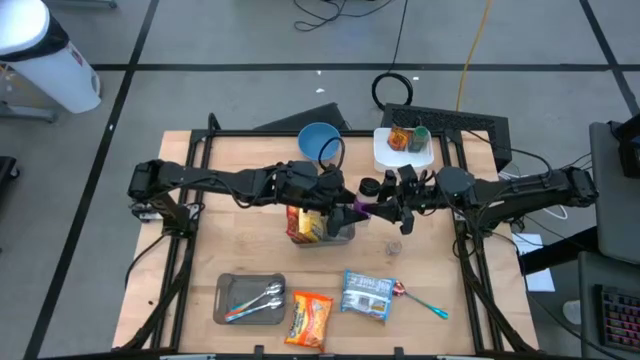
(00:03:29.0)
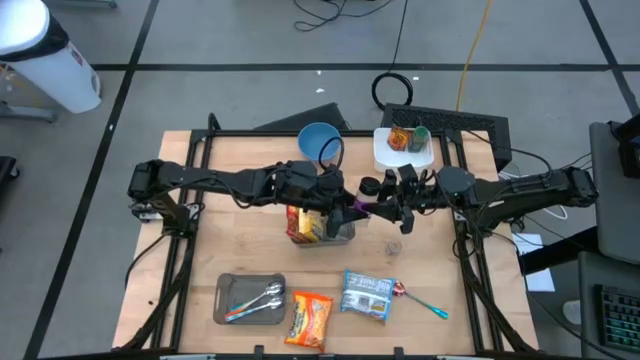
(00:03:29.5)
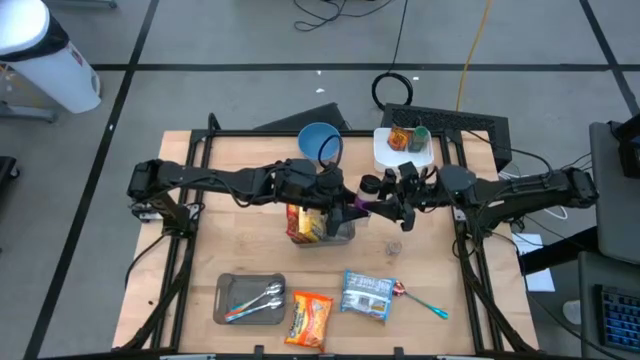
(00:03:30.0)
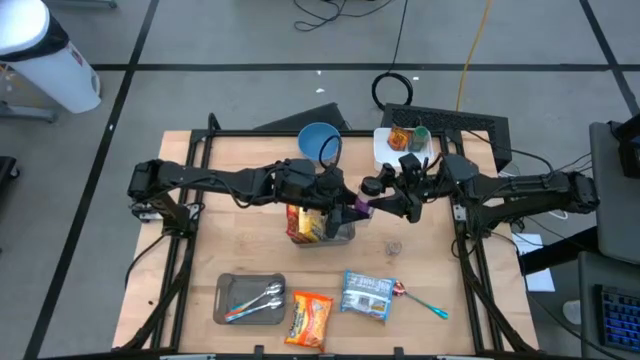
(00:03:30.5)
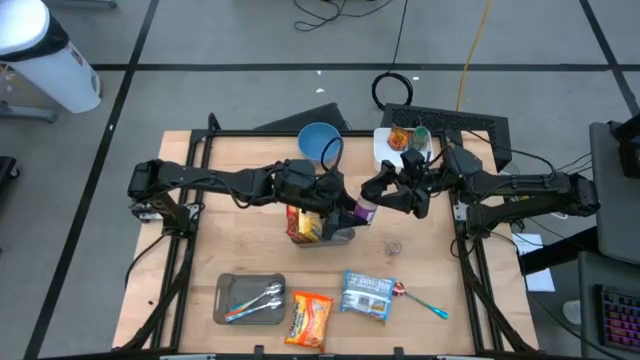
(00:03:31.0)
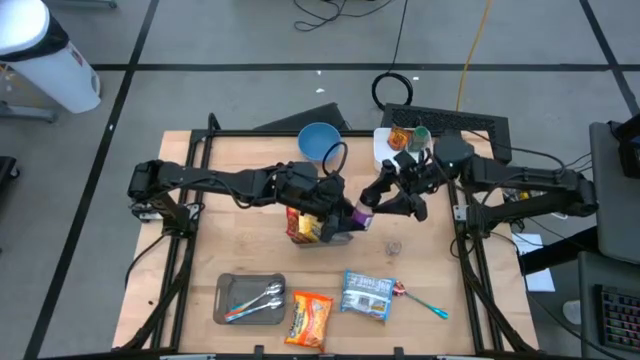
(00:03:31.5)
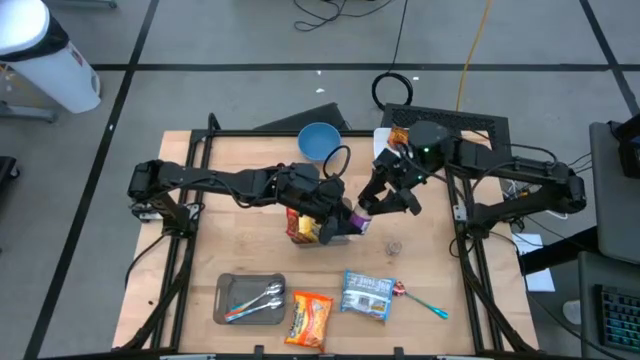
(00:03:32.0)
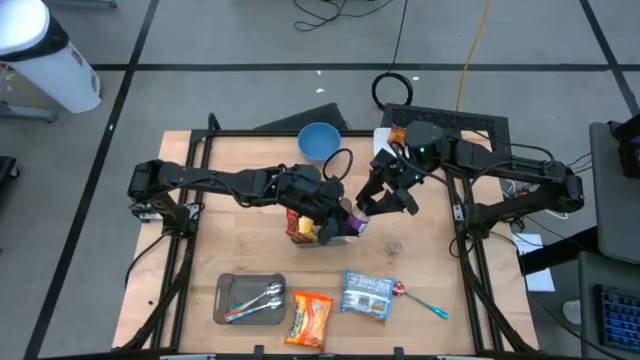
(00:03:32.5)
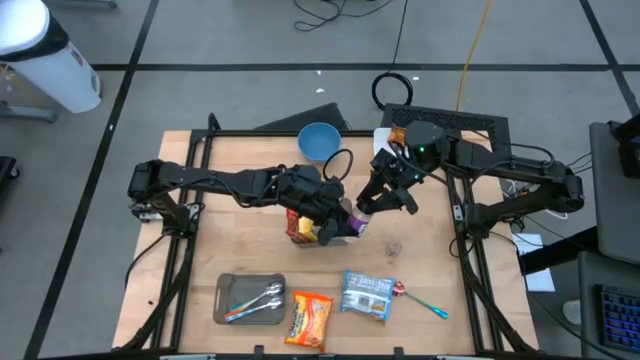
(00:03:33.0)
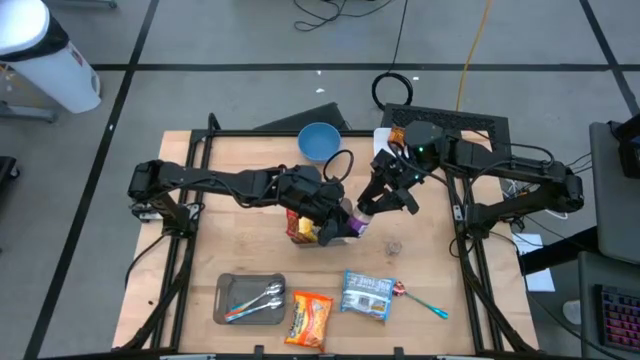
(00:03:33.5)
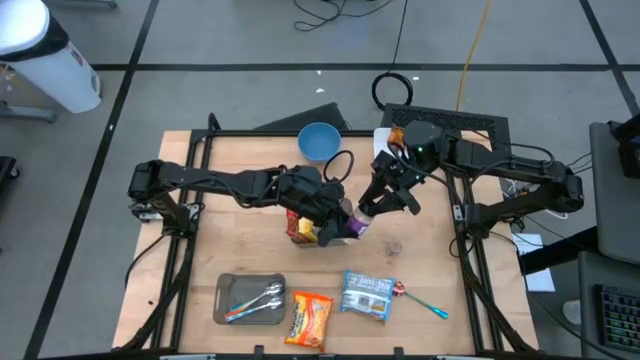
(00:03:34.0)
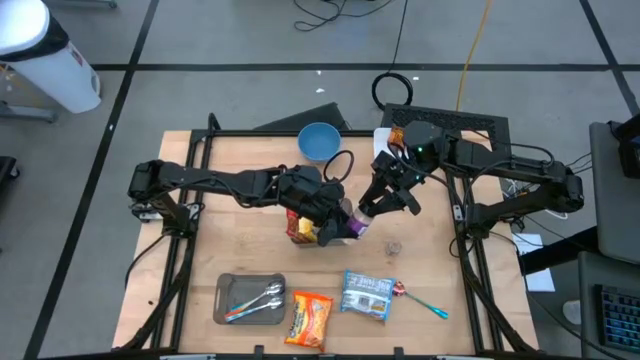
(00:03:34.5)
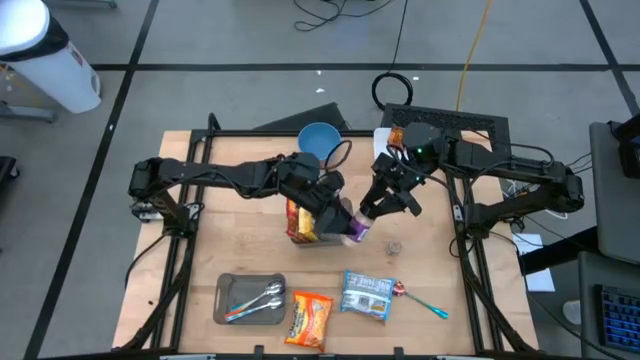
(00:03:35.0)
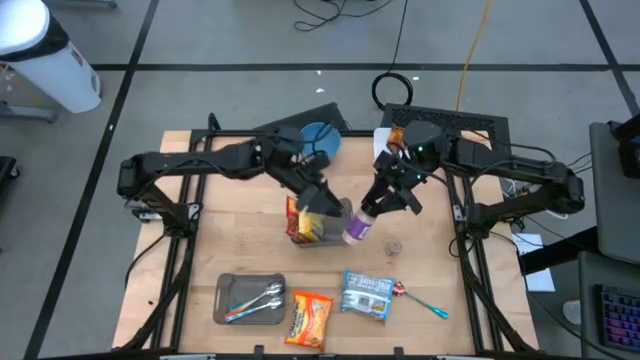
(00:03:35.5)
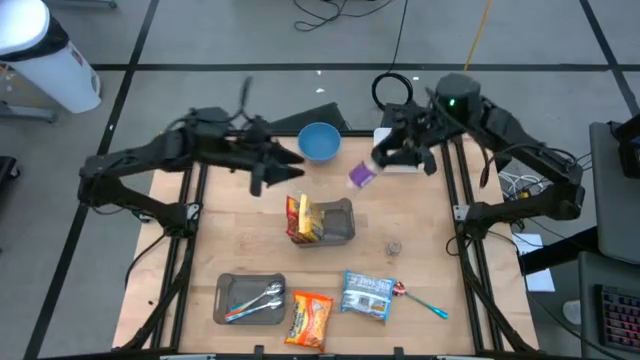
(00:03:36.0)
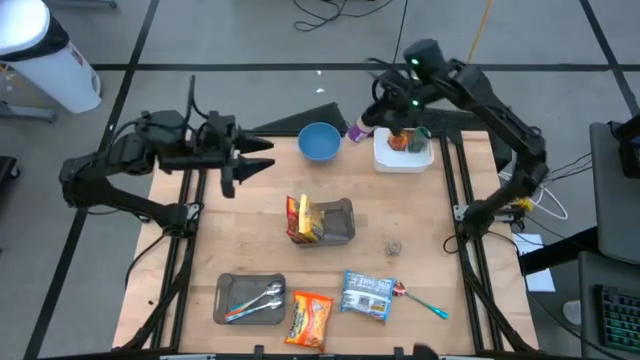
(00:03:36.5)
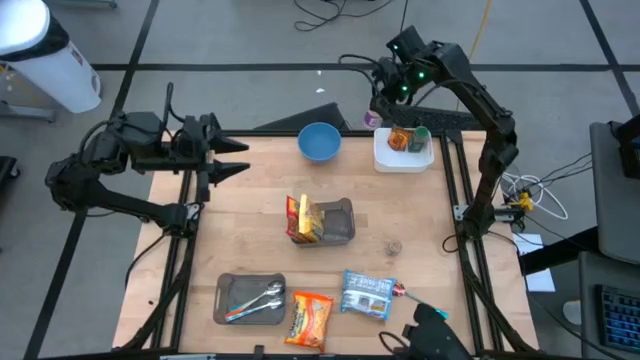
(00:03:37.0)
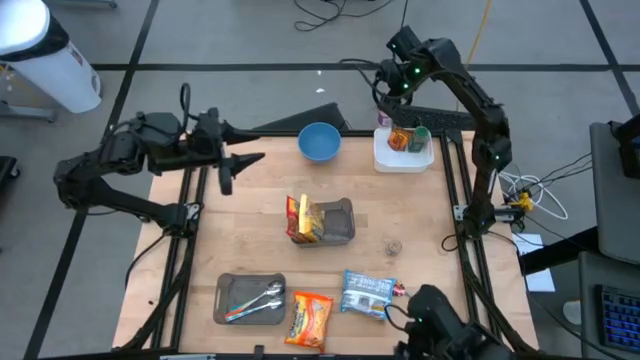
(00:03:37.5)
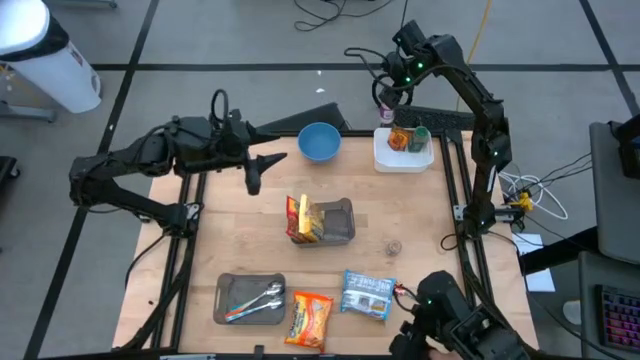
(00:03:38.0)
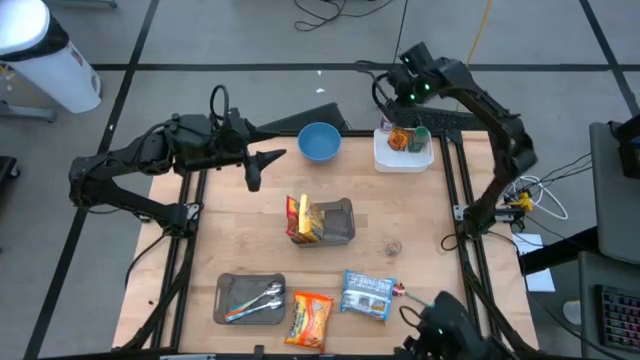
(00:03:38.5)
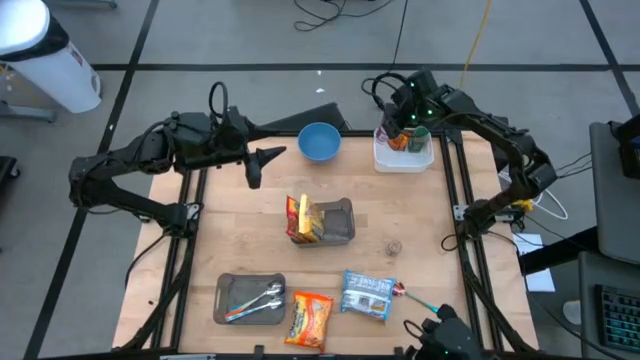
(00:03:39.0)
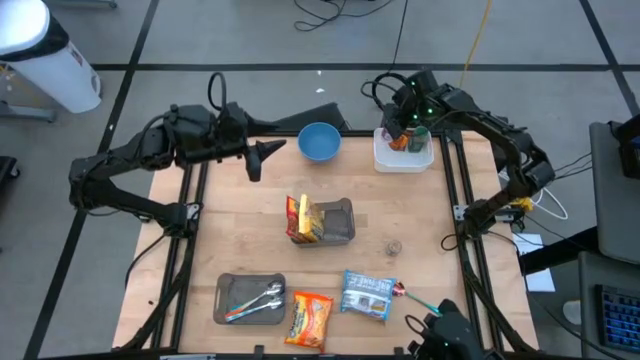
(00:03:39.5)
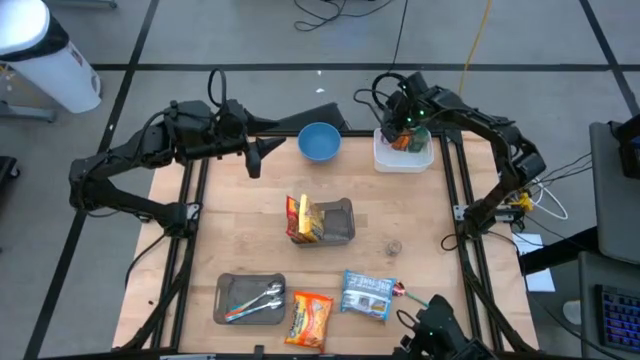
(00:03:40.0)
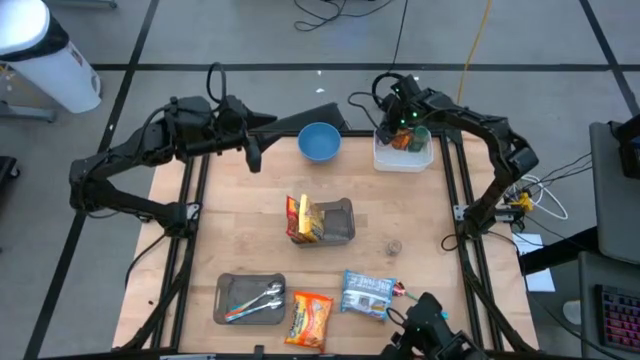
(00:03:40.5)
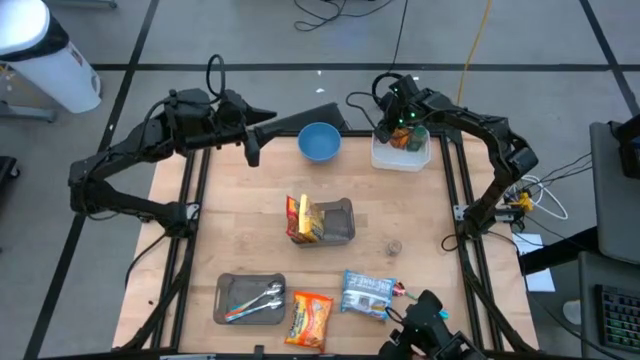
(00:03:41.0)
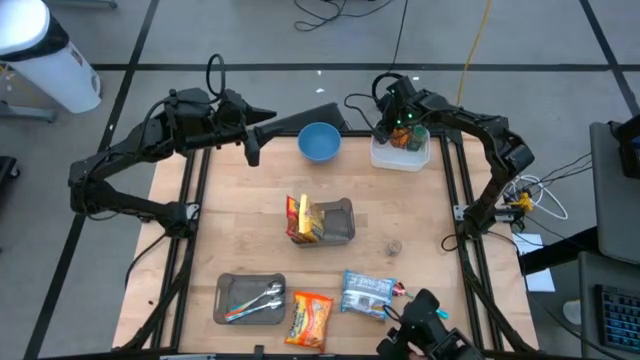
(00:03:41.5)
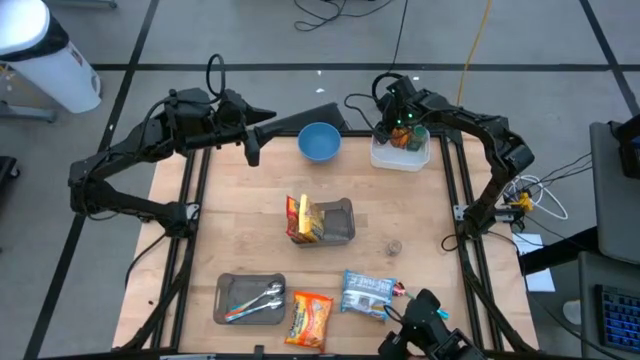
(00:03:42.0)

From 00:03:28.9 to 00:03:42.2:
Task: Pick & Place Food Item
Put the purple seasoning bottle into the top white bin

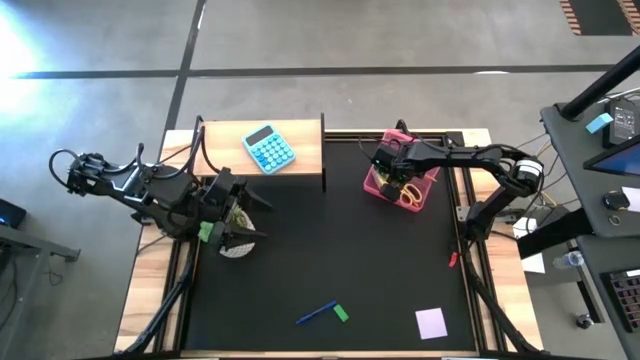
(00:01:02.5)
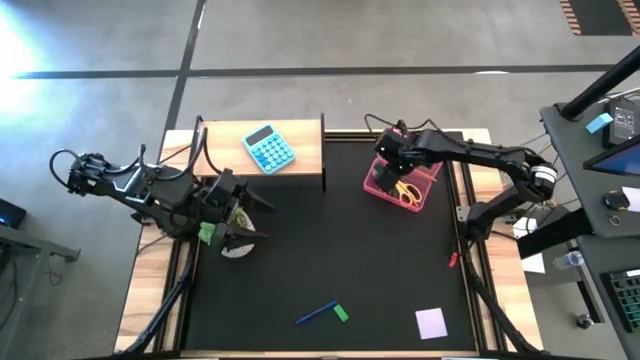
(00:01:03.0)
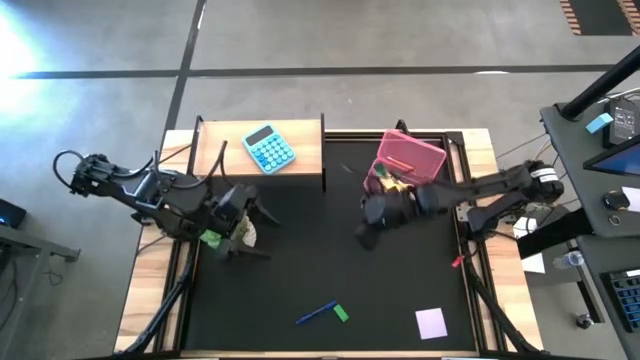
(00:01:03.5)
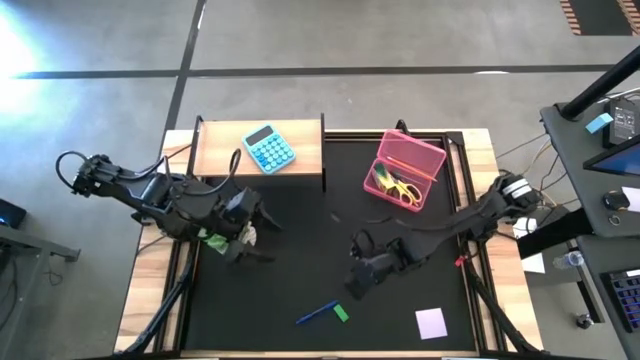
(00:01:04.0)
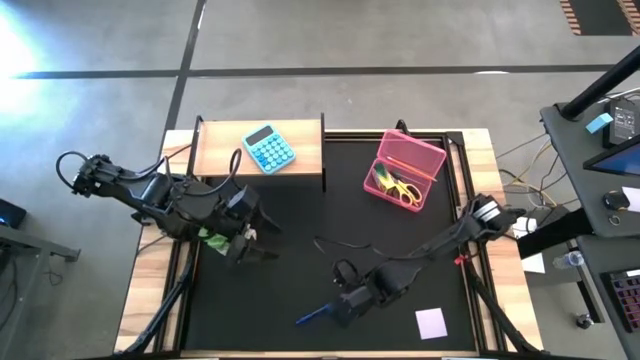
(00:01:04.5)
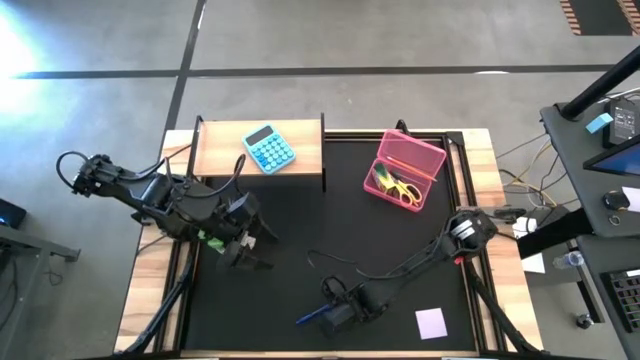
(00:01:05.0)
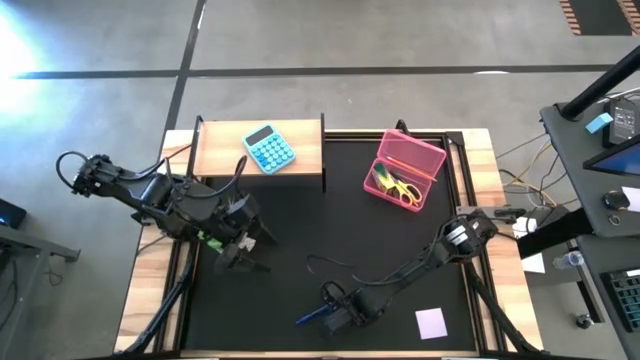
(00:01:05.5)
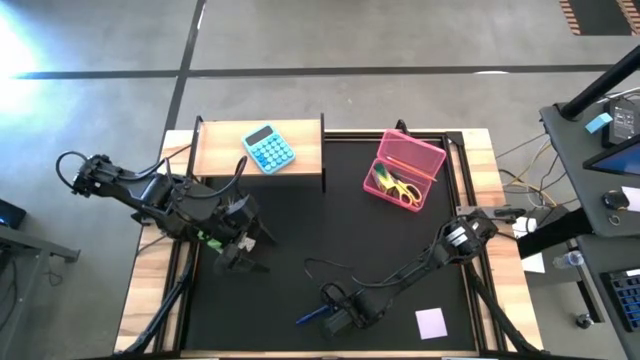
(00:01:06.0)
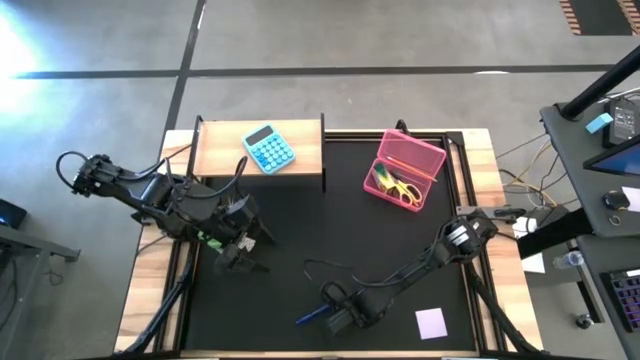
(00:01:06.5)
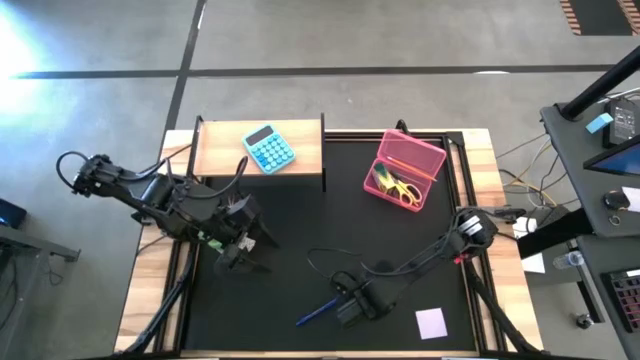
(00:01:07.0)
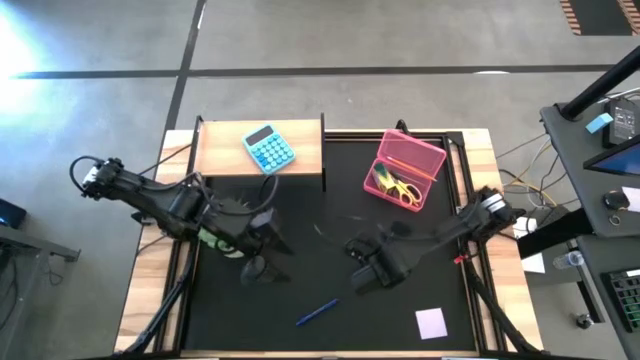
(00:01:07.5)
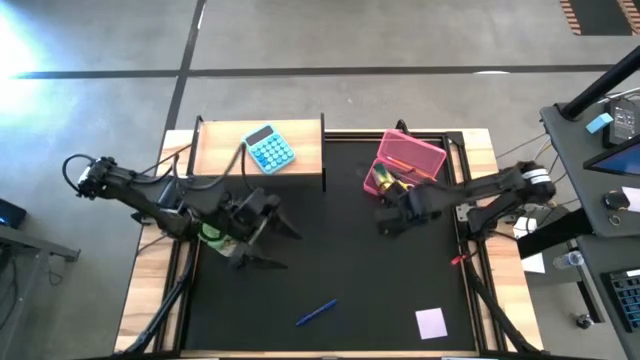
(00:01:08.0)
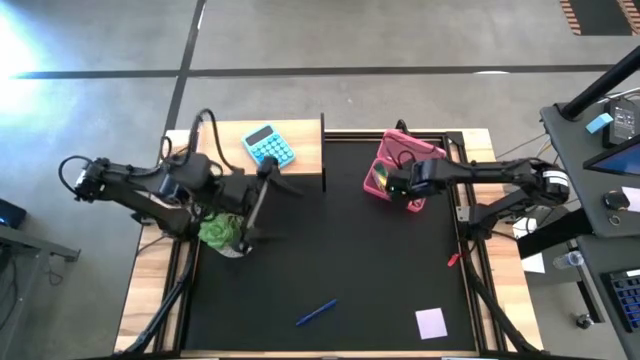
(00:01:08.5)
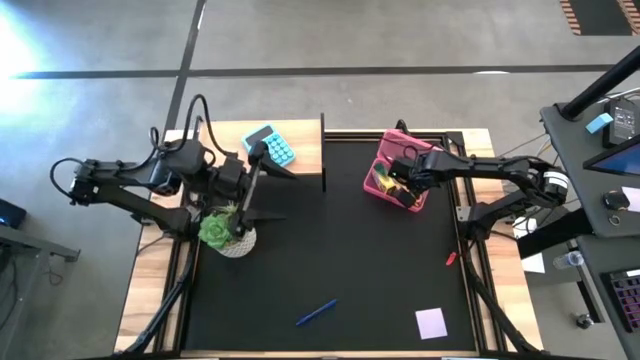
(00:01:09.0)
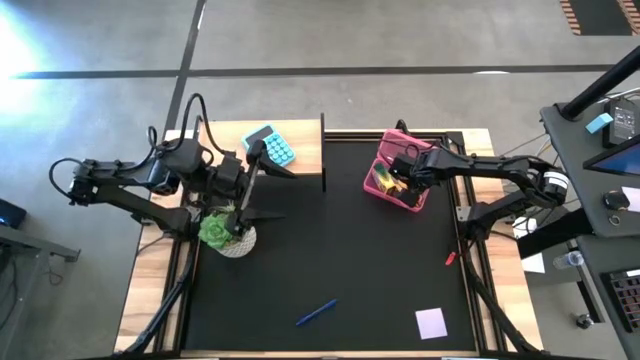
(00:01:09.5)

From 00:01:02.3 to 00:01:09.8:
Task: Pack school essentials
Put the green eraser into the pink supply box
